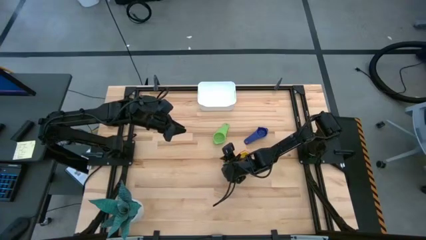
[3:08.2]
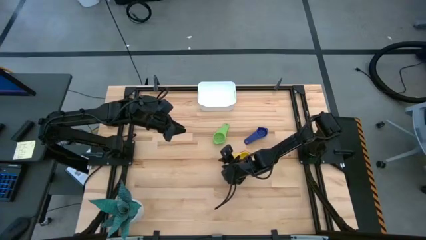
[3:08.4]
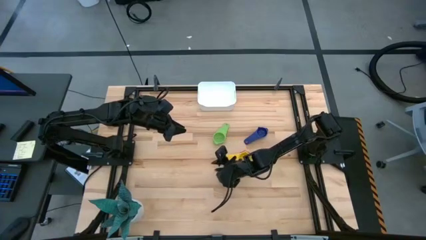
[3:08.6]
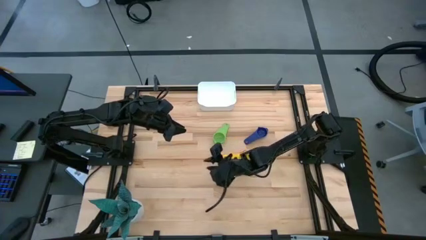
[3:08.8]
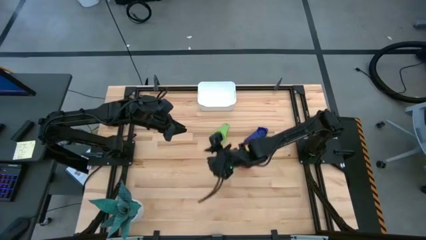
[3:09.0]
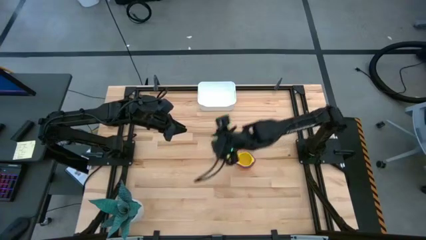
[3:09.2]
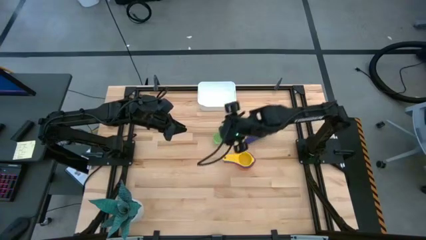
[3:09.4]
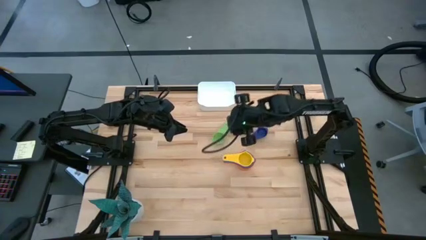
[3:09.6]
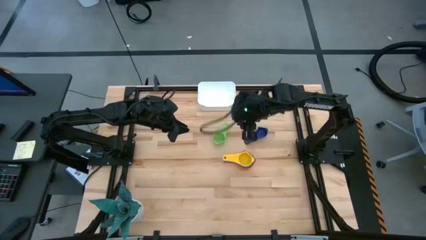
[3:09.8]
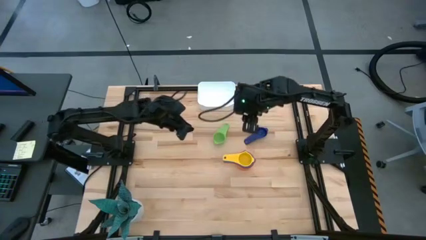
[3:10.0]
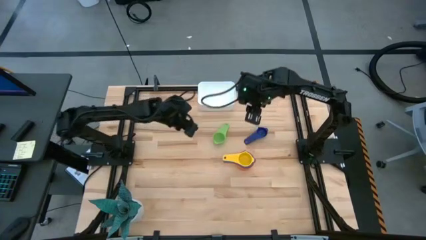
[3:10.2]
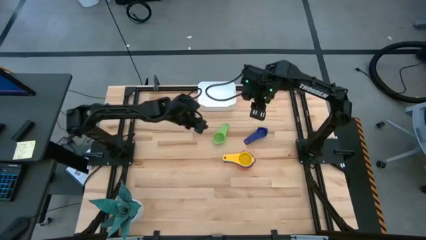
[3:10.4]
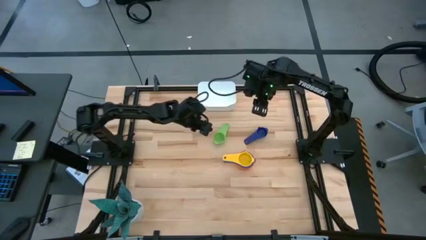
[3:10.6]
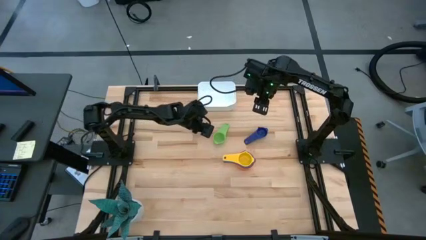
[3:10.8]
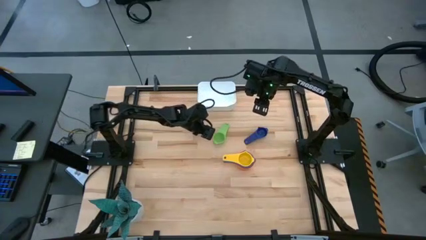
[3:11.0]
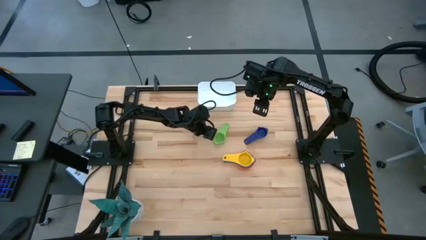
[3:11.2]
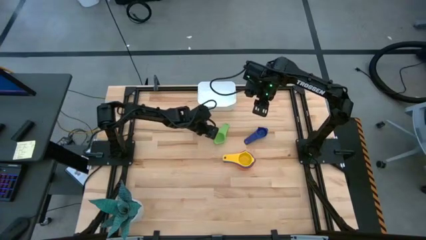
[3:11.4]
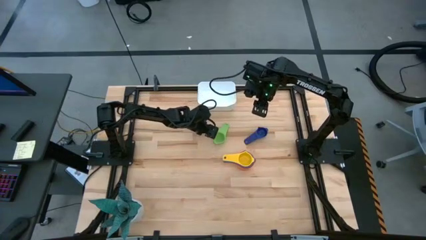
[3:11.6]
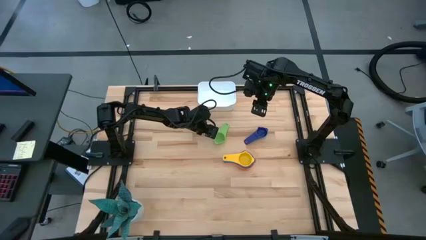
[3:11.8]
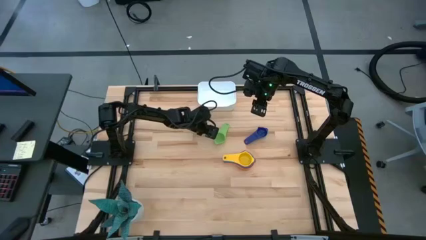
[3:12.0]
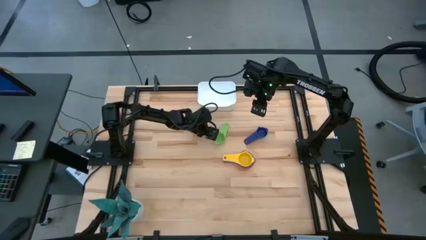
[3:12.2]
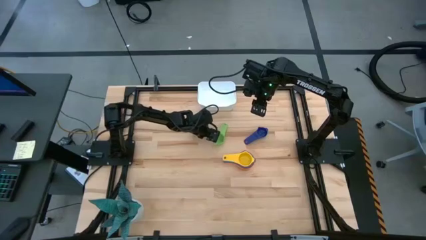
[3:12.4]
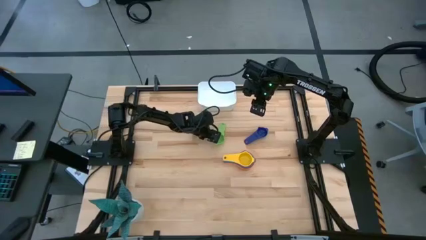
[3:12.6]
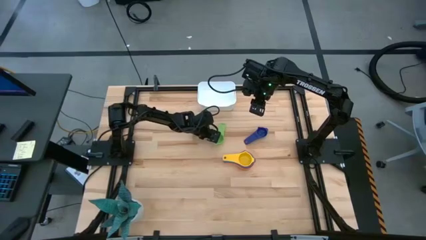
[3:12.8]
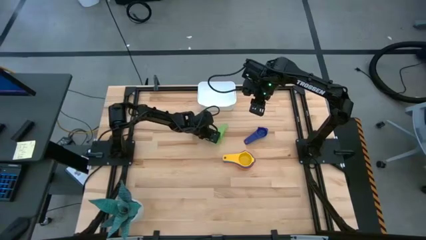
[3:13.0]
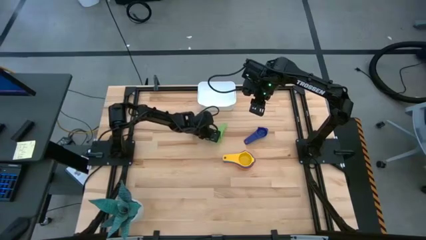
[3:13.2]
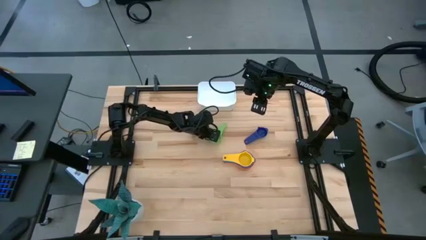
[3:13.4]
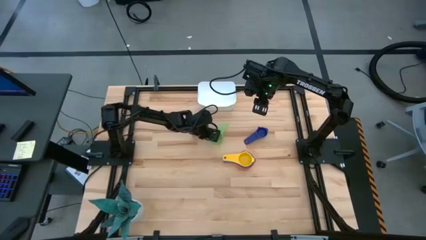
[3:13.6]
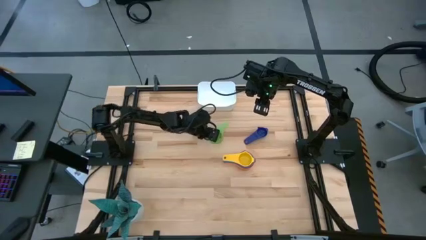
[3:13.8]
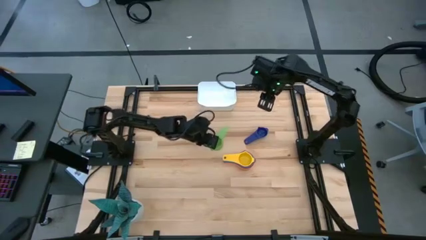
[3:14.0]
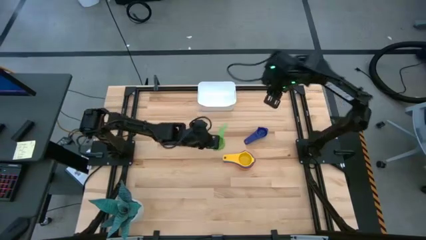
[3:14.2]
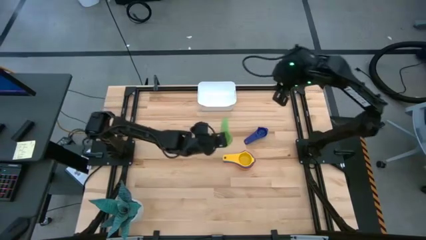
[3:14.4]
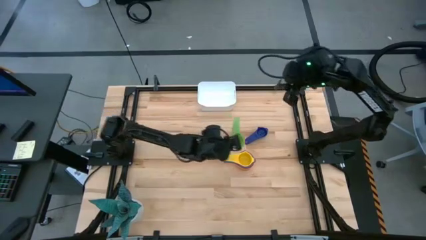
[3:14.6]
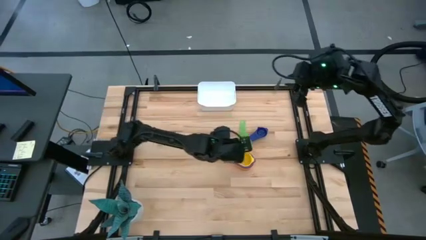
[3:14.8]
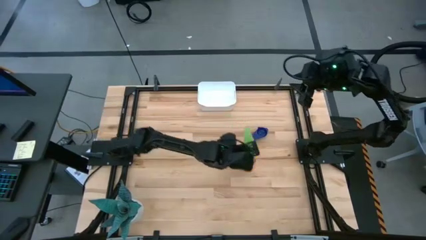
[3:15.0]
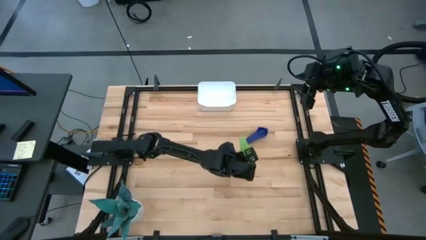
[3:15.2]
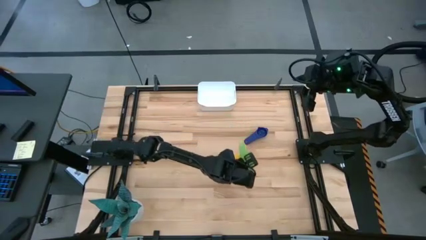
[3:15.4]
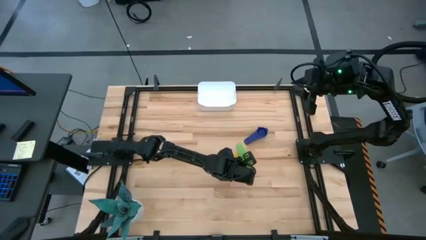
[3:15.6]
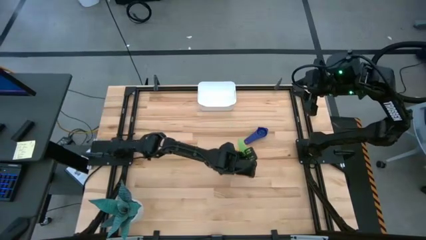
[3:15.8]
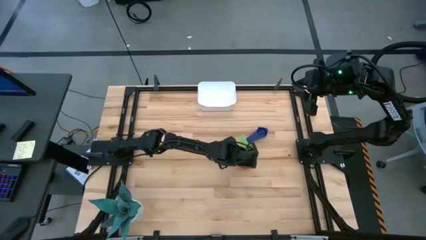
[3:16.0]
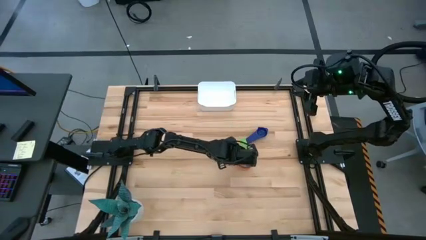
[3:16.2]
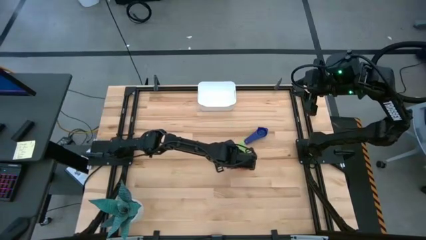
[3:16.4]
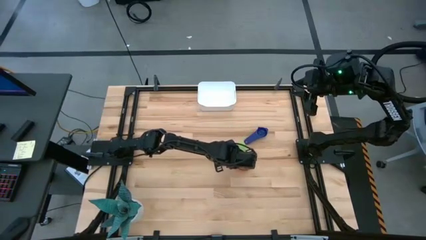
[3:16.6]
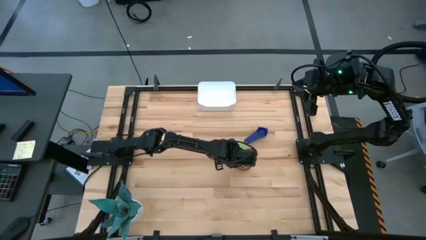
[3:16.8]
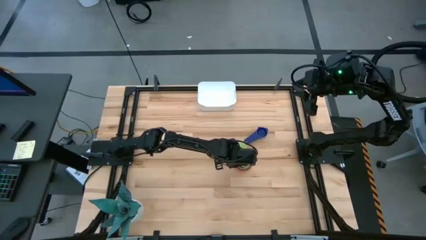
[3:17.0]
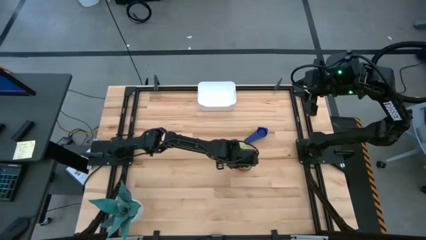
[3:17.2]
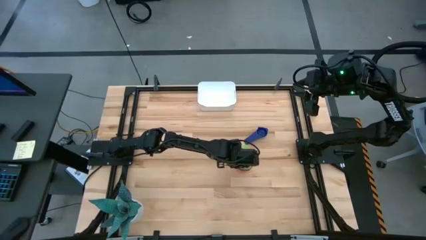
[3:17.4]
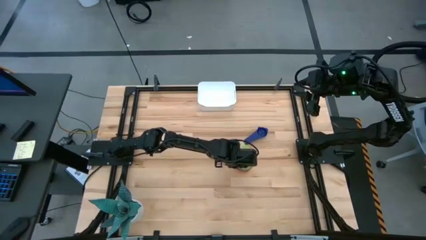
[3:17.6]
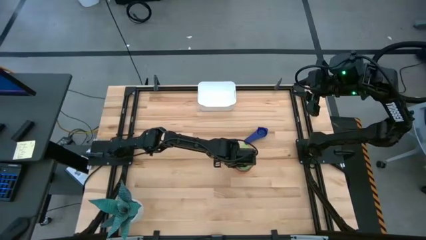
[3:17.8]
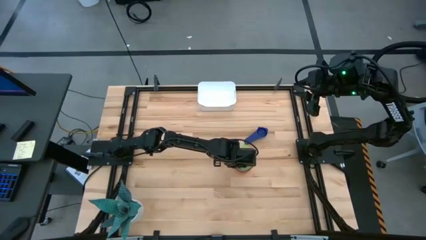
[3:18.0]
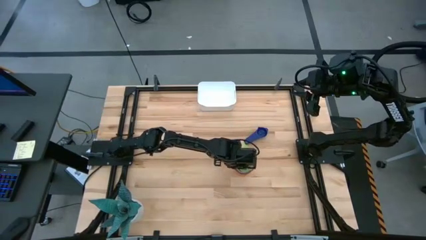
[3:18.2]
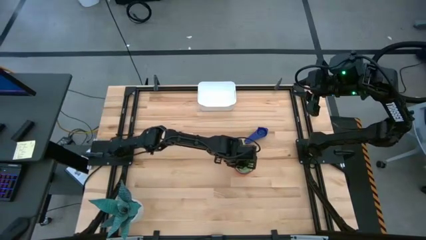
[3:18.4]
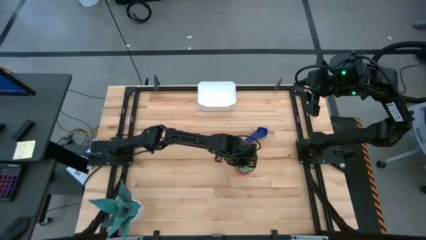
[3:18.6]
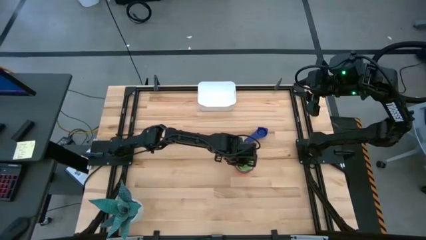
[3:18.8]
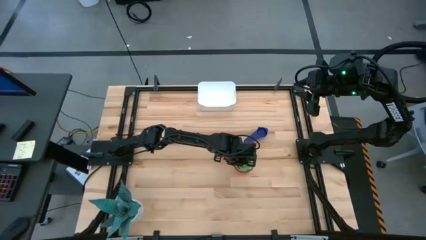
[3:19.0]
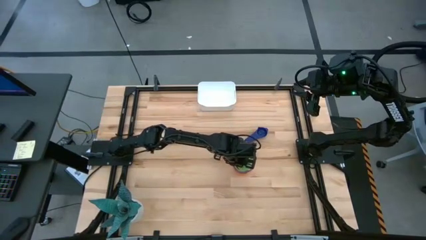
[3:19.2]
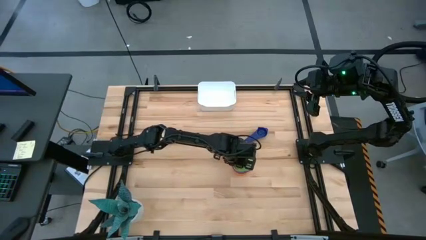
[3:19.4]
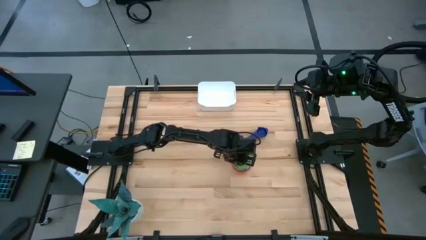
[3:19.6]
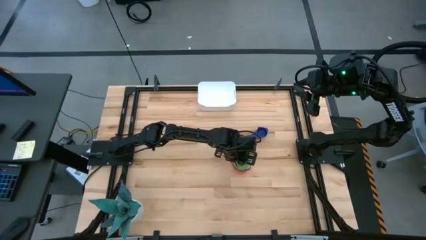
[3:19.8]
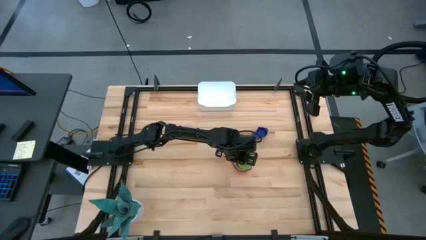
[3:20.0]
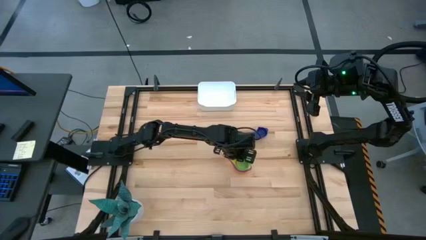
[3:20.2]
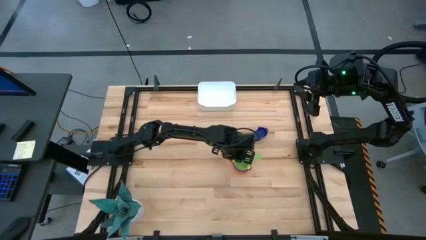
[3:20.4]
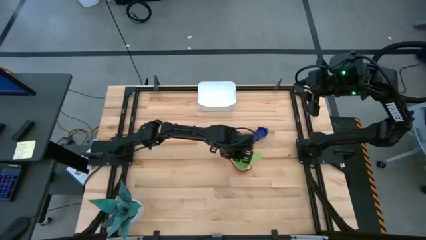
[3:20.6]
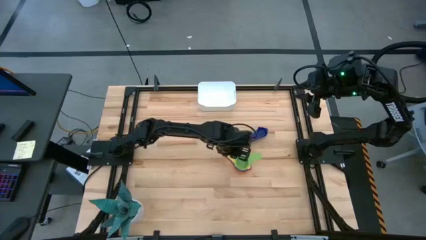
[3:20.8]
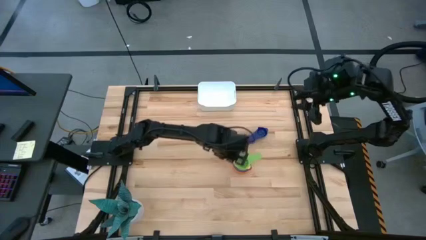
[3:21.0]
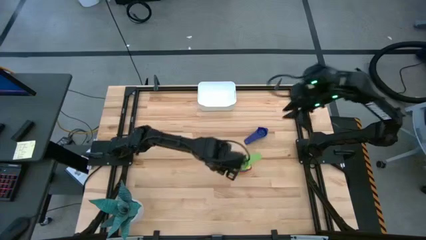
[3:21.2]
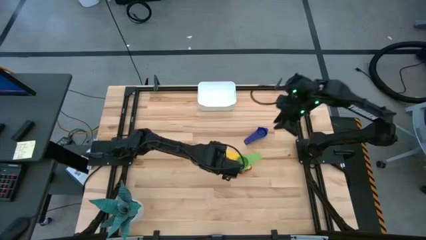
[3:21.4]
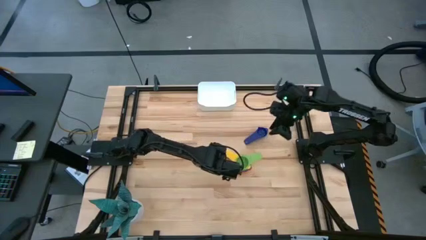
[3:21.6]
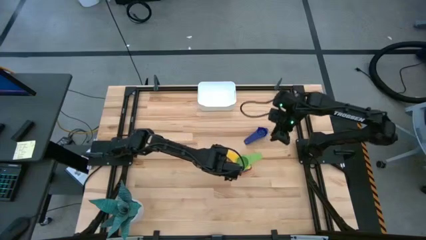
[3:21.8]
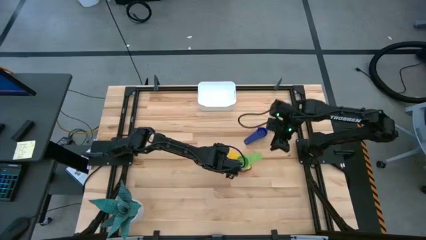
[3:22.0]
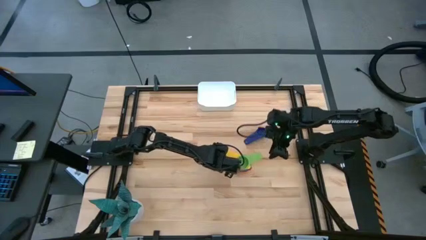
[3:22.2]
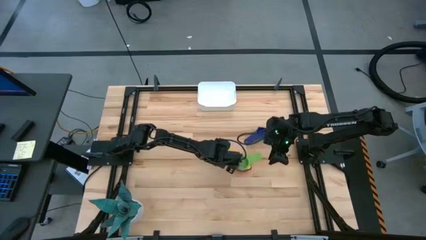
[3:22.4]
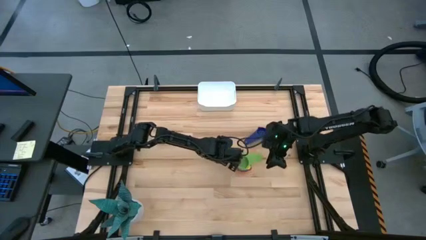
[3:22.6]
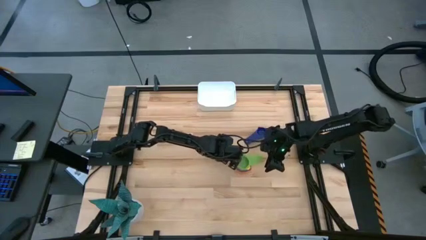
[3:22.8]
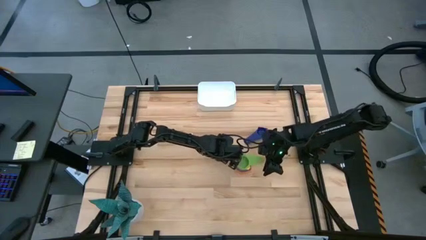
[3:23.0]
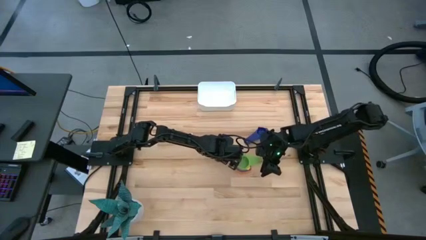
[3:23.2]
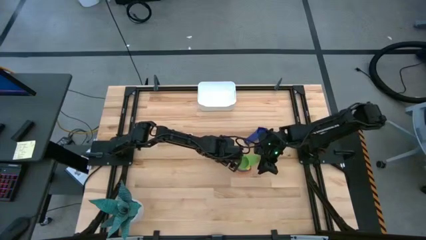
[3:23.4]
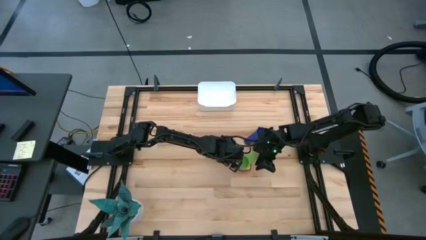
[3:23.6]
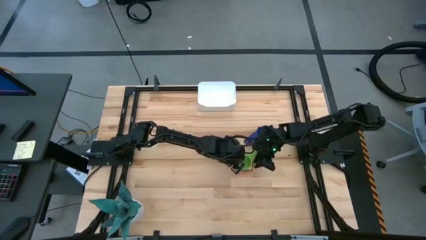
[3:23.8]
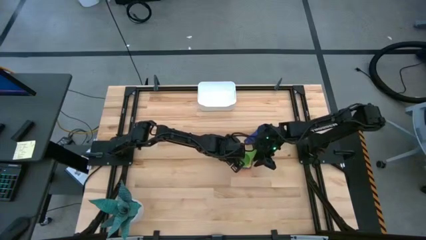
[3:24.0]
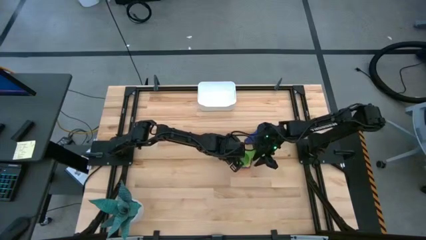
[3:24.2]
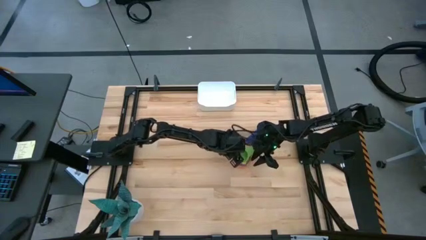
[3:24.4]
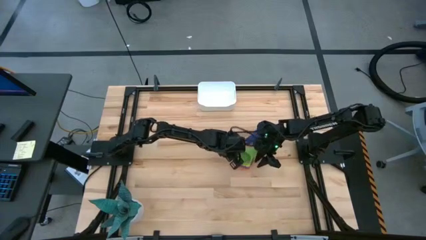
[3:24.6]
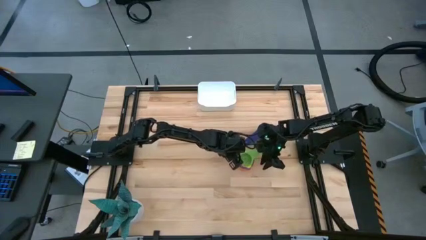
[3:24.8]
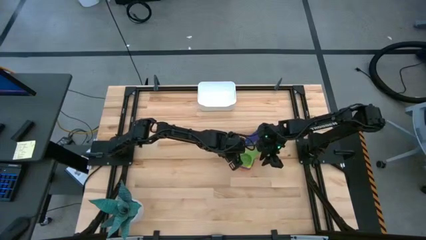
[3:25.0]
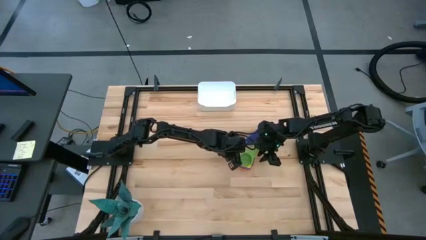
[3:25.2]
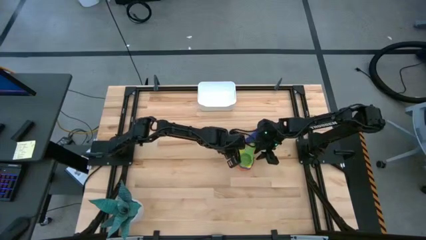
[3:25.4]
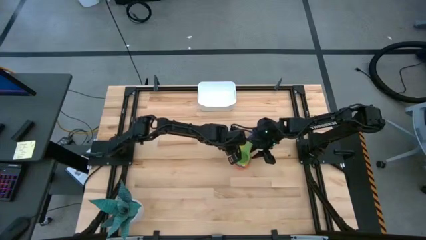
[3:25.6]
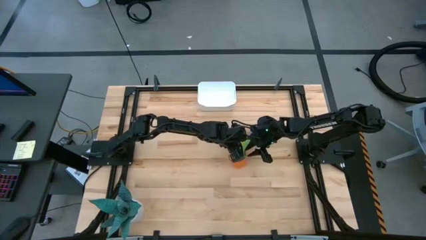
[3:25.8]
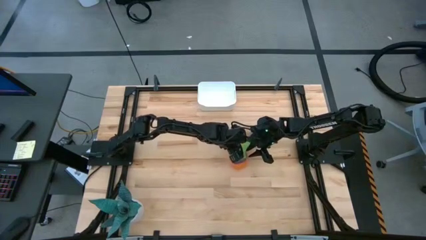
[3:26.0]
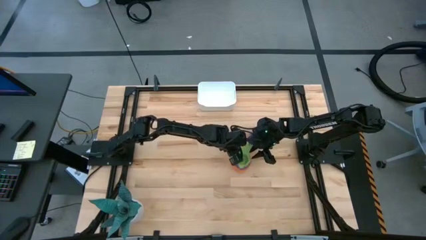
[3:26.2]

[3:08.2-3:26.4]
Task: Nest measuring cups in basket
Stack the green measuring cup on top of the yellow measuring cup
